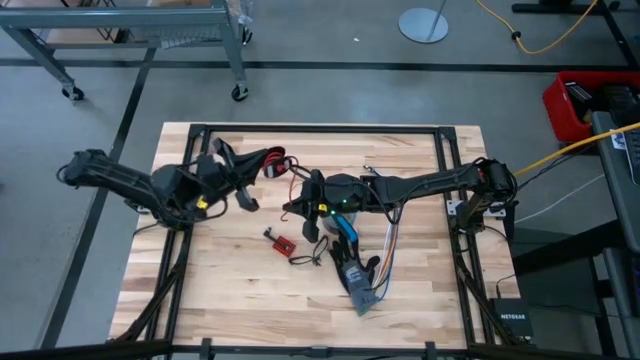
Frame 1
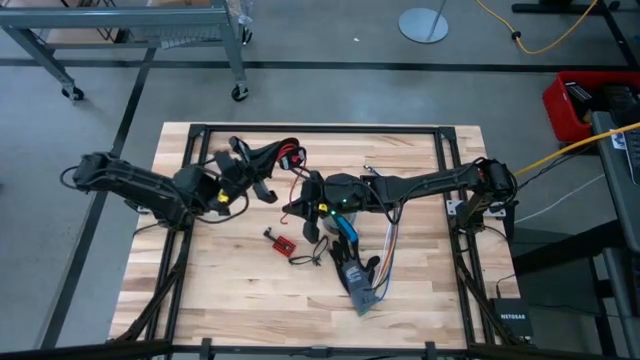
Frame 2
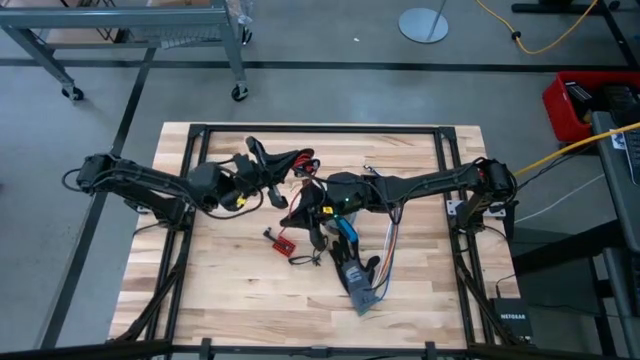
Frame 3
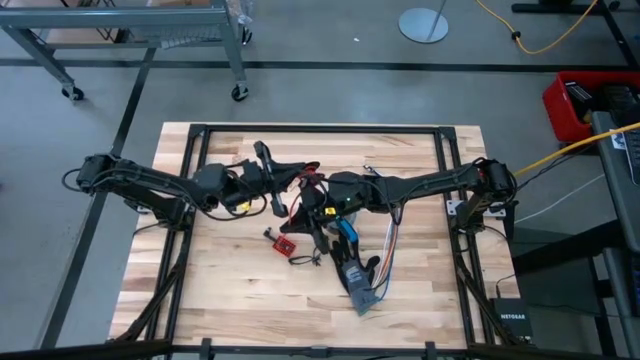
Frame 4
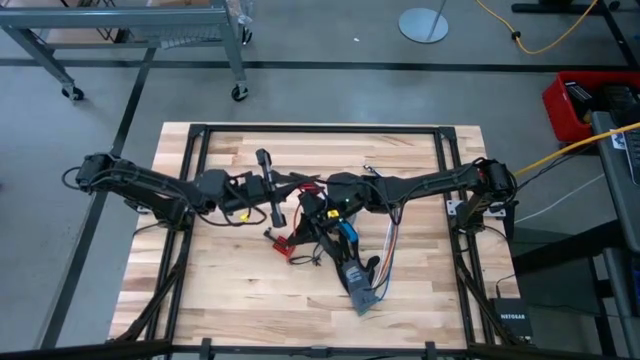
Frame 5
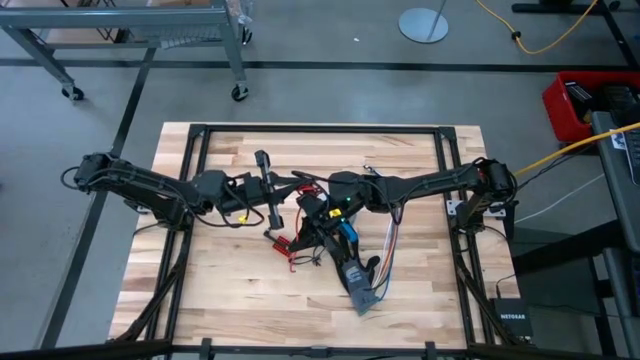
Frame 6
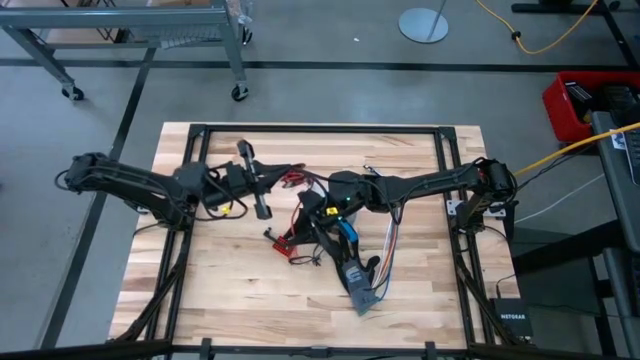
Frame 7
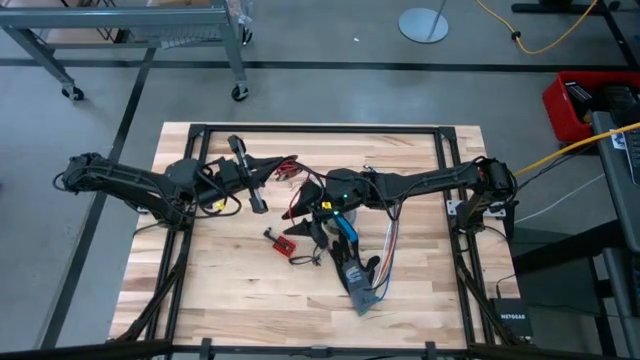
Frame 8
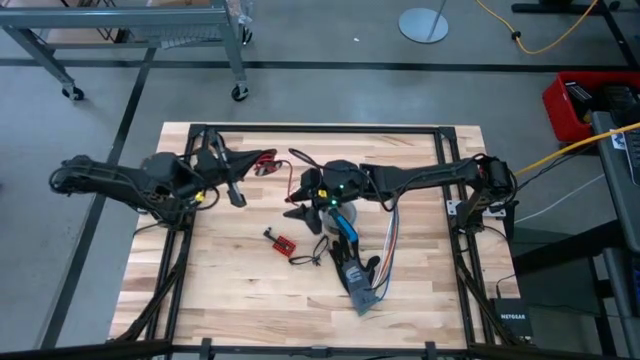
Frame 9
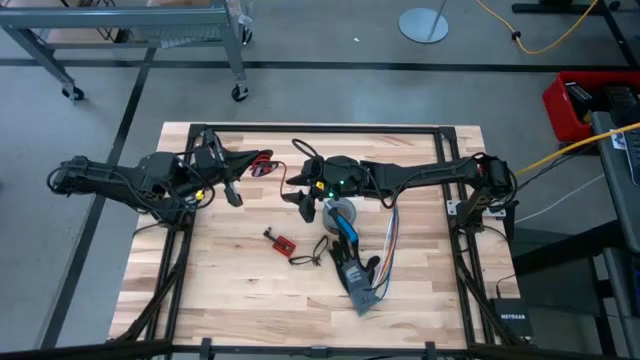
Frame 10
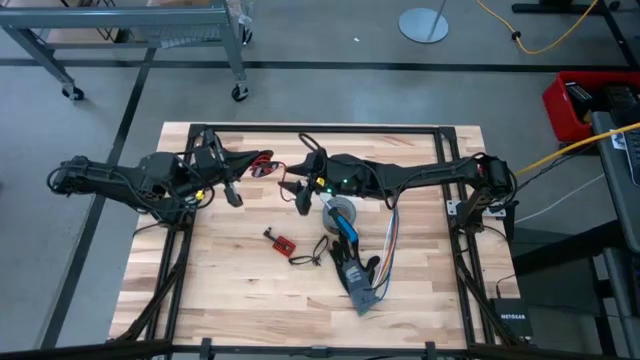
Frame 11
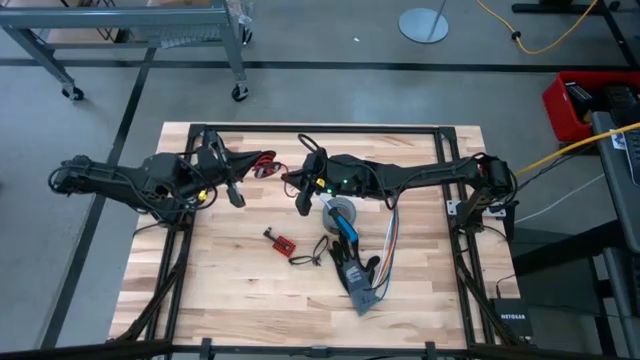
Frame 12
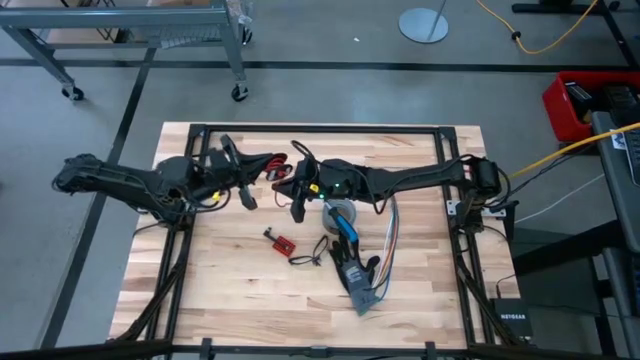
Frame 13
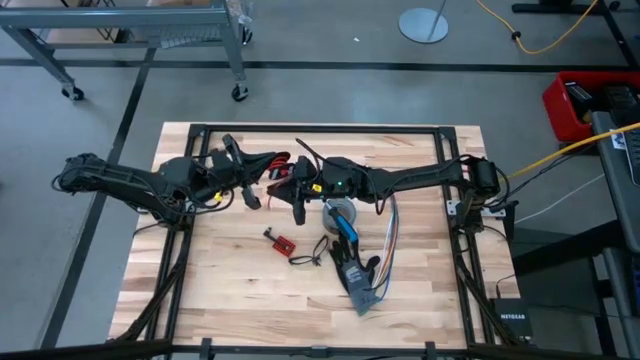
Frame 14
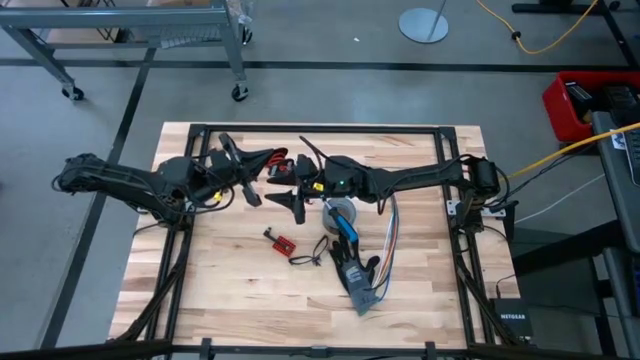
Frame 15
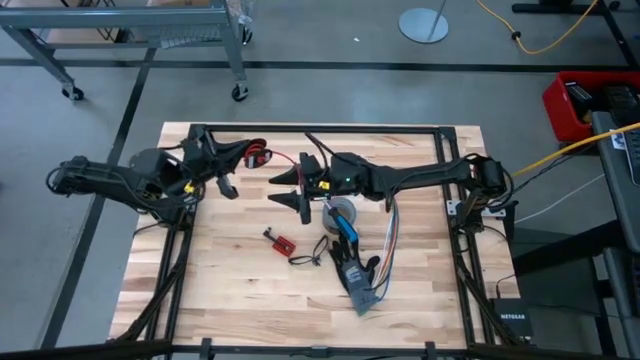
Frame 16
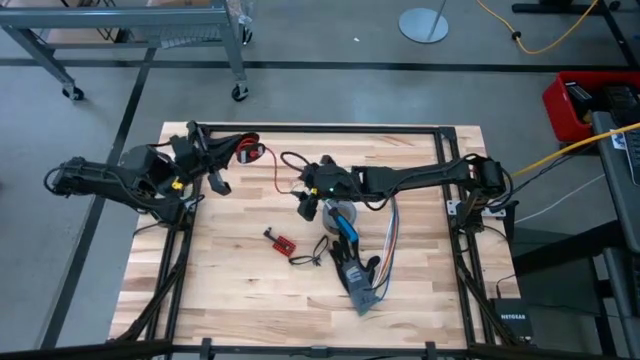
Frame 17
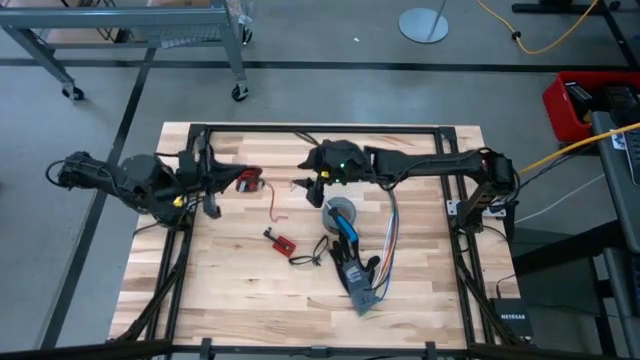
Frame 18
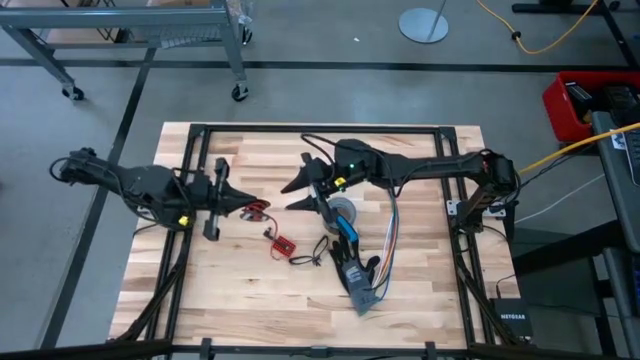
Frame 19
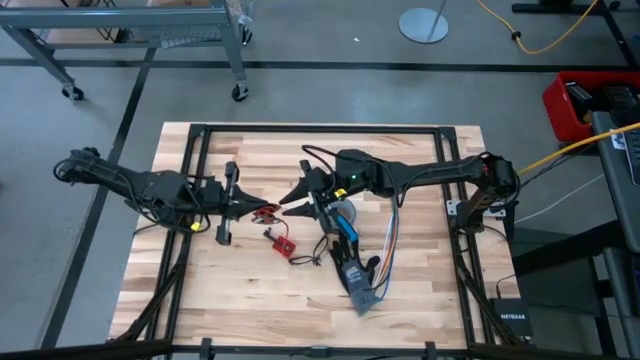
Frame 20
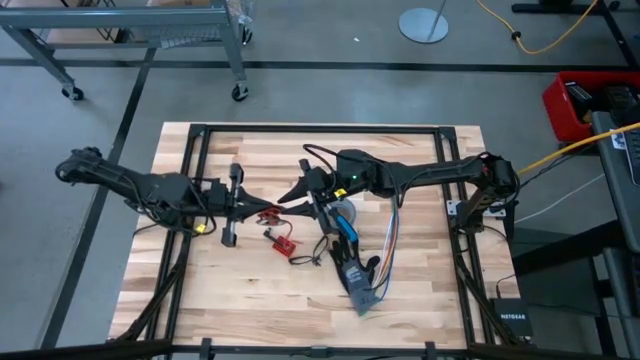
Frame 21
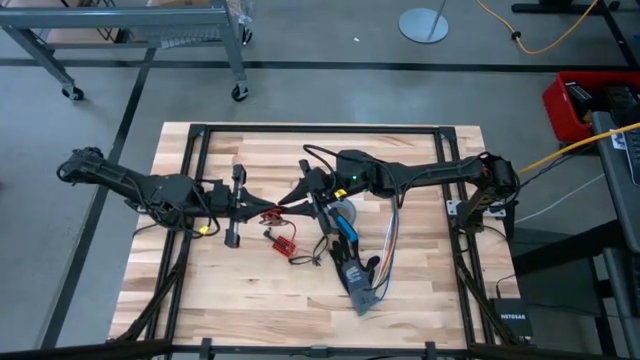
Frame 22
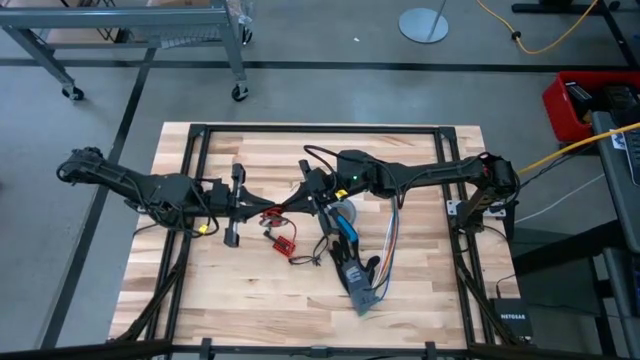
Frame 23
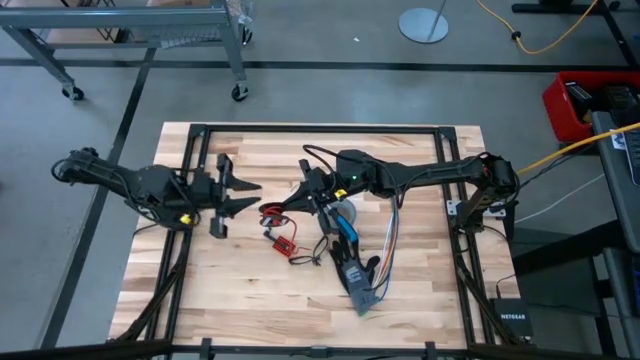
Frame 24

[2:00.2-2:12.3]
Task: Coil cords
Coil the red wire around the spool

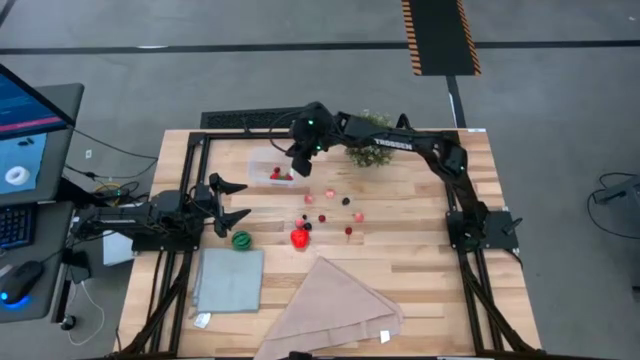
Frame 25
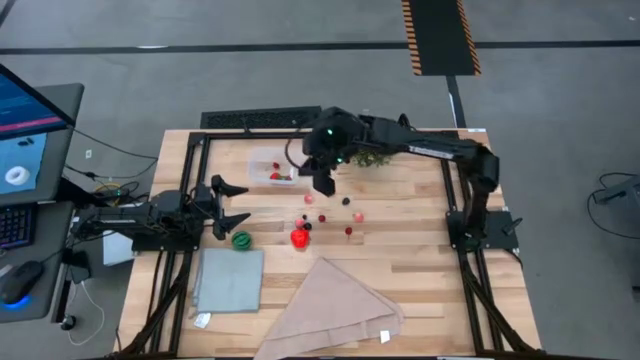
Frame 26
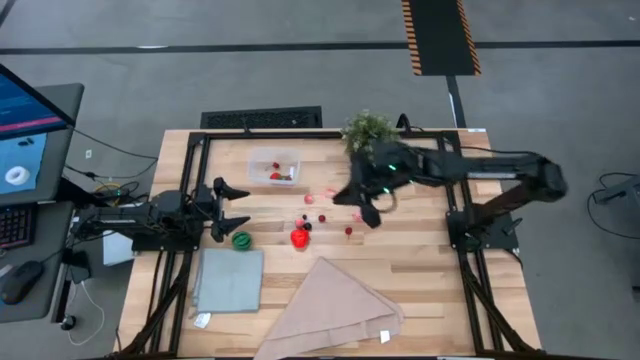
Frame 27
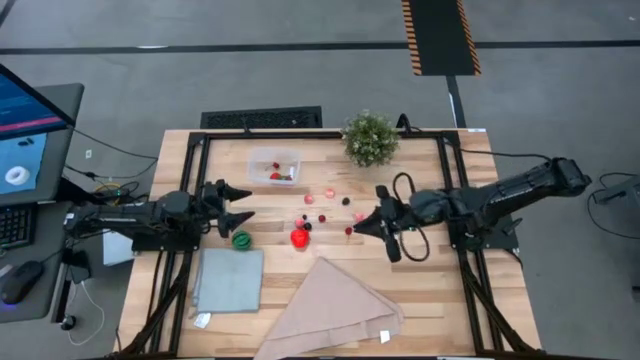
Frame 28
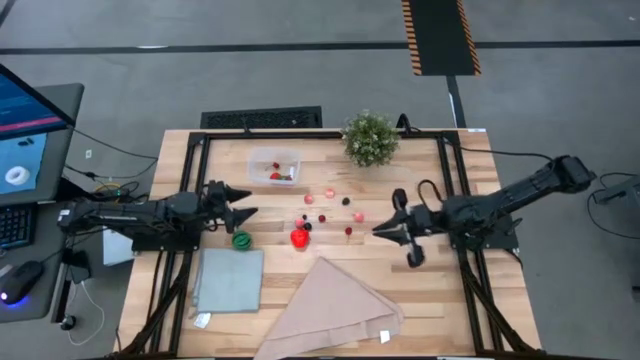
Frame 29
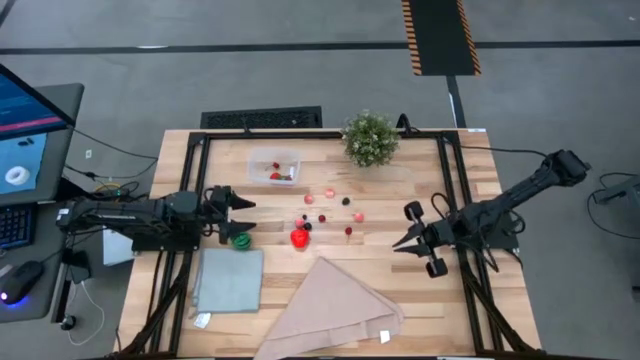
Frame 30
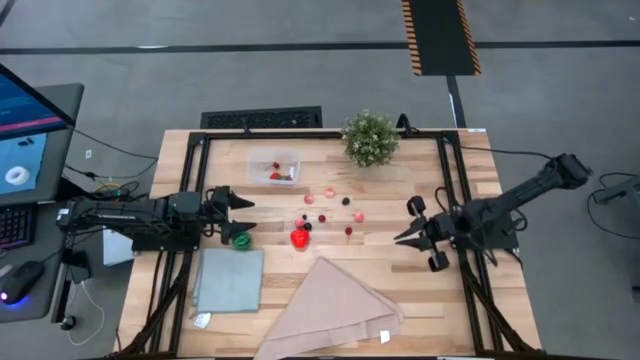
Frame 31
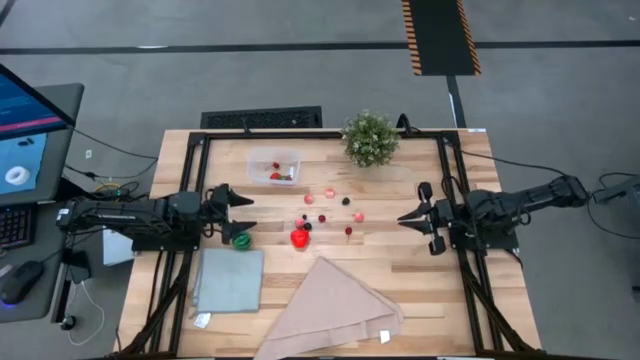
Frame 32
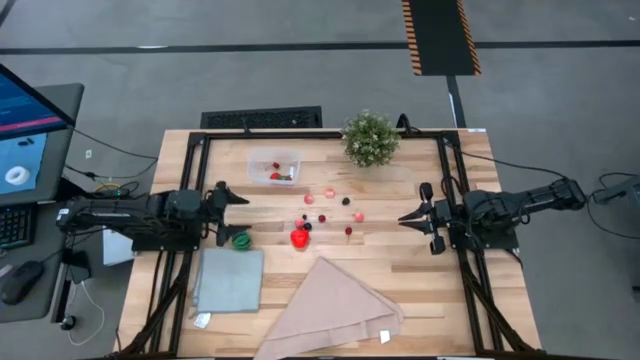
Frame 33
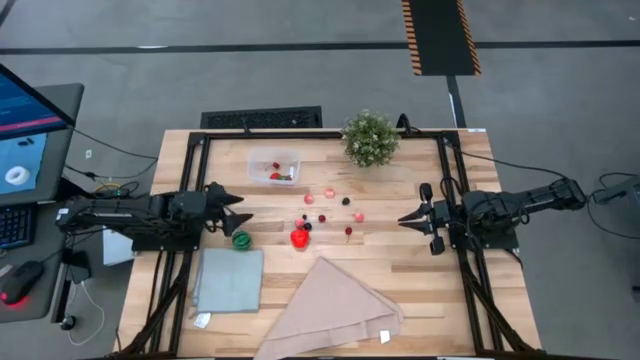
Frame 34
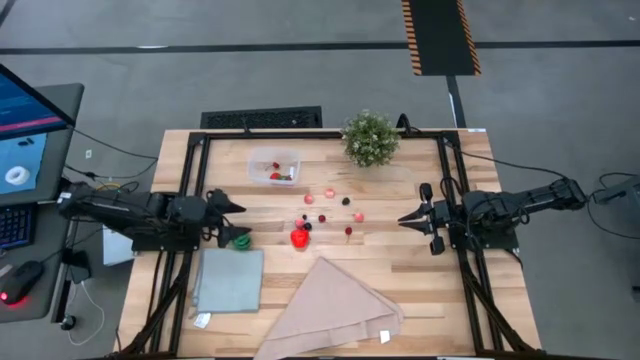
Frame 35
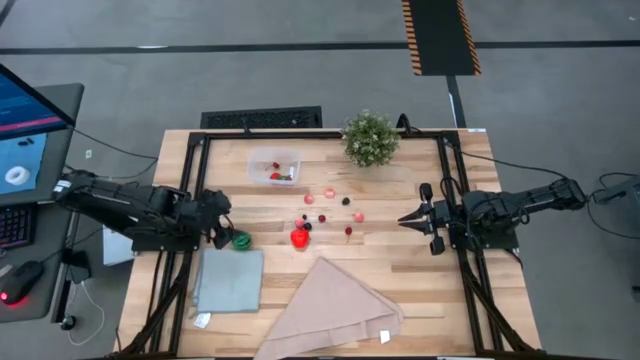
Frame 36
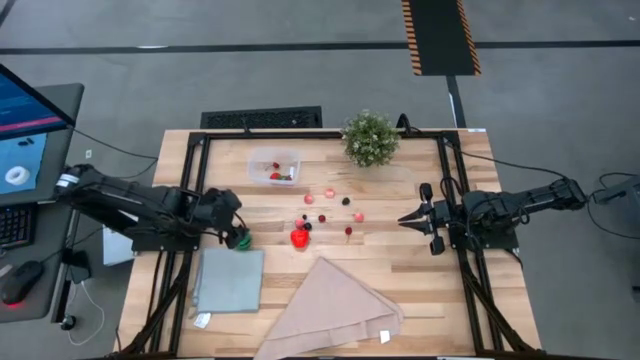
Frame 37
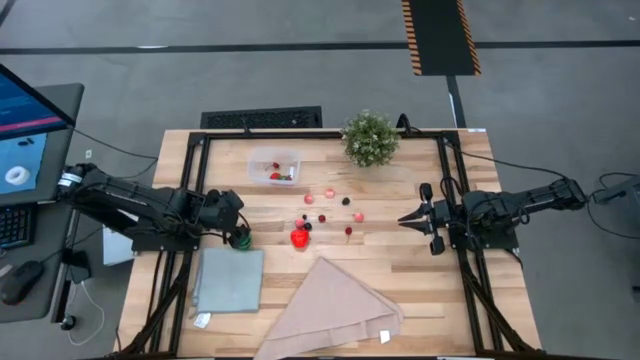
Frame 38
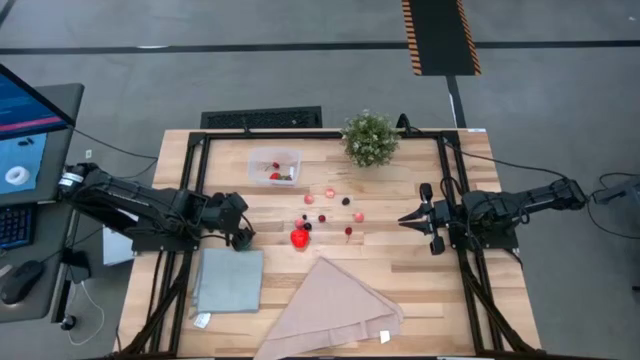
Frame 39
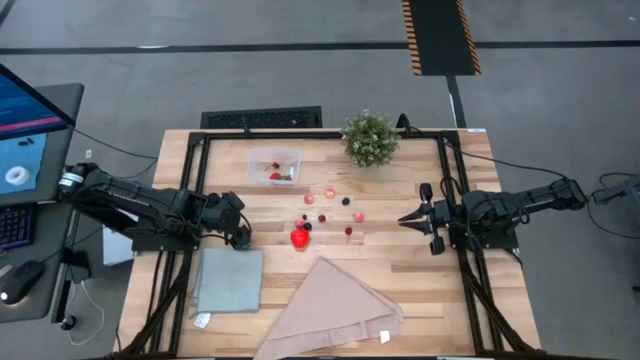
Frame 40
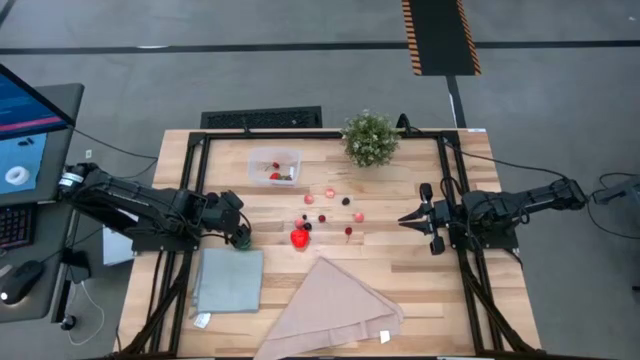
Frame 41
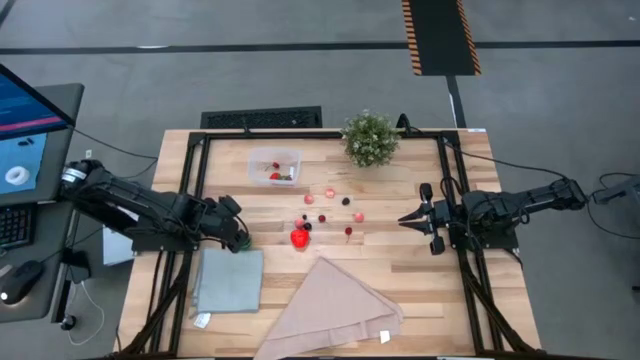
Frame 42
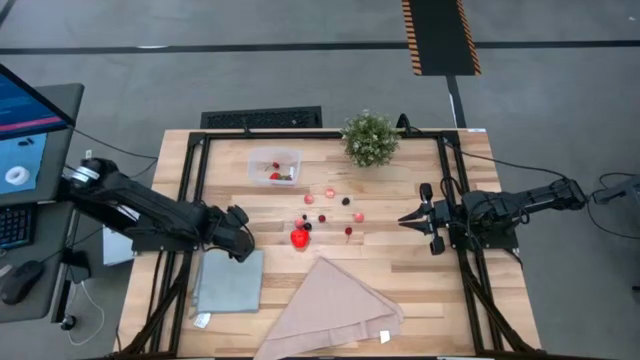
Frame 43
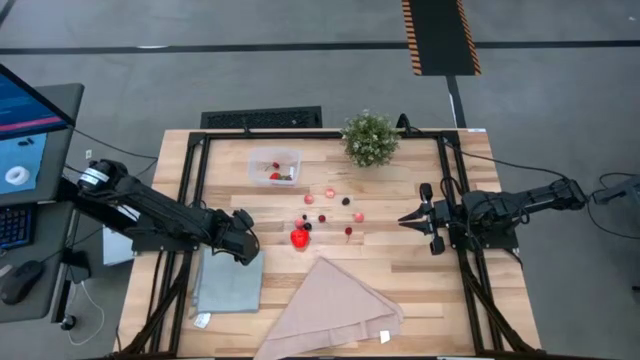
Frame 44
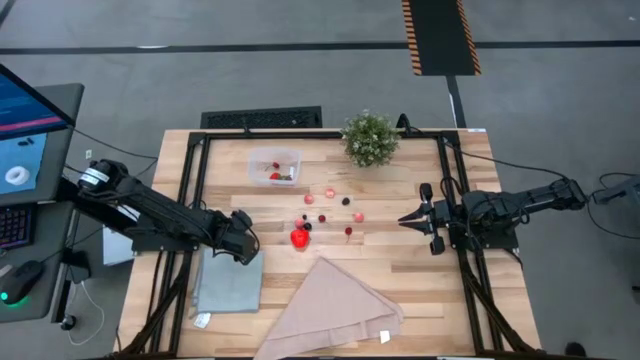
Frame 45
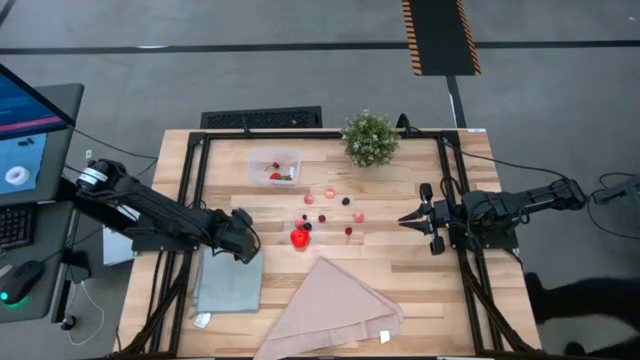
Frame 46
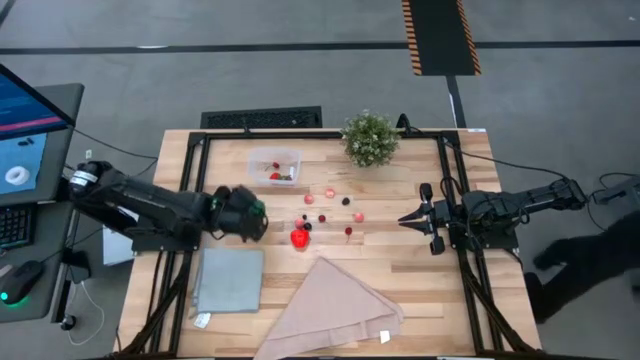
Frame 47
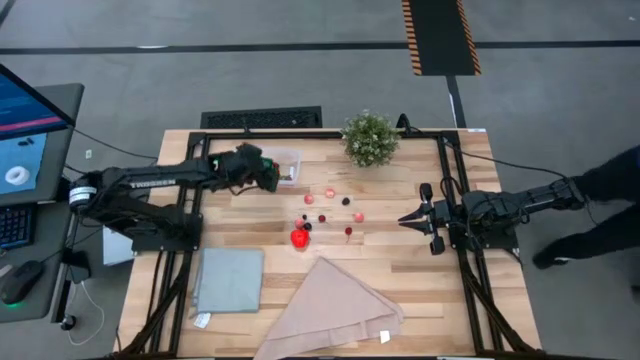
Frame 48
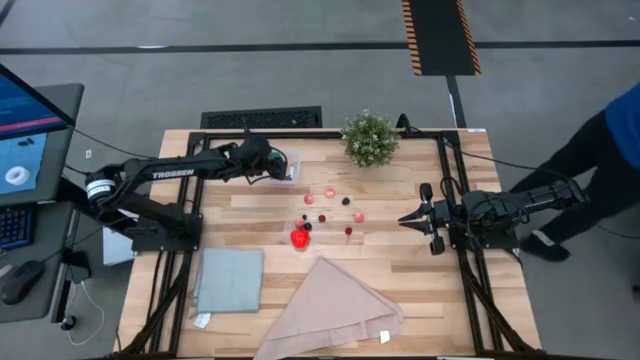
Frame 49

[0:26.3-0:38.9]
Task: Pick and placing Produce into tupperware
Put the green watermelon into the transparent container
